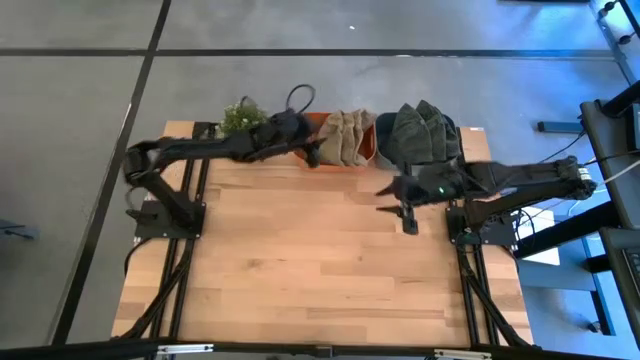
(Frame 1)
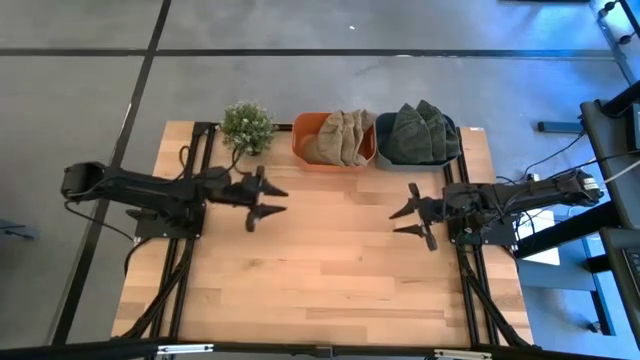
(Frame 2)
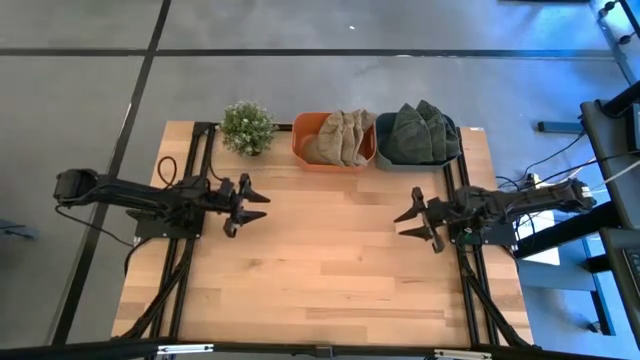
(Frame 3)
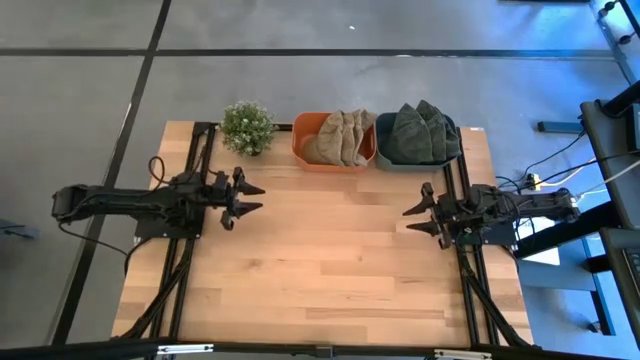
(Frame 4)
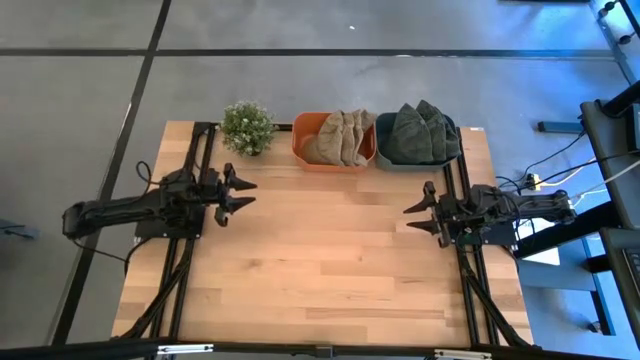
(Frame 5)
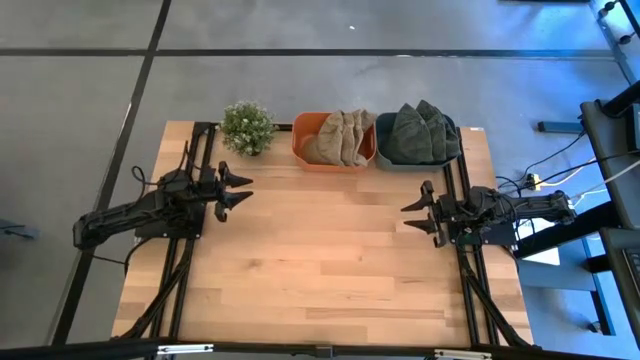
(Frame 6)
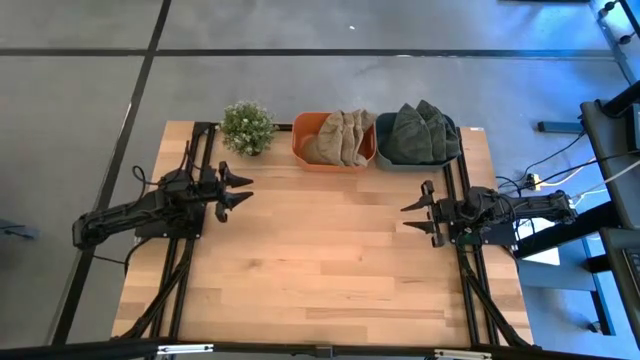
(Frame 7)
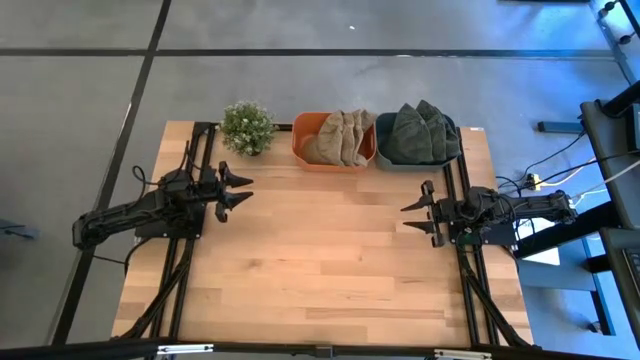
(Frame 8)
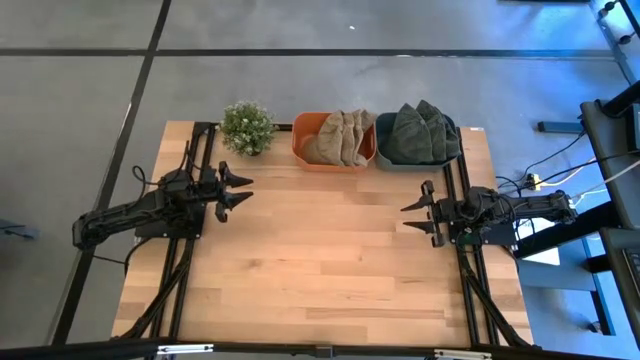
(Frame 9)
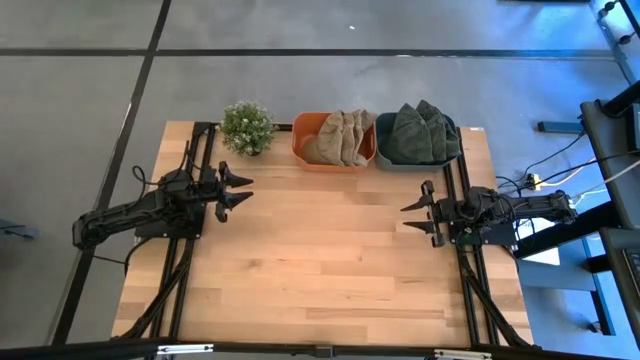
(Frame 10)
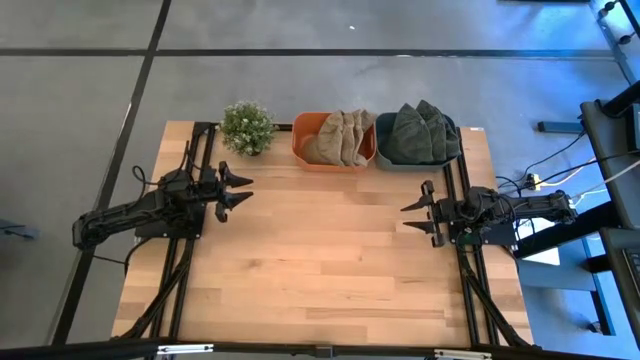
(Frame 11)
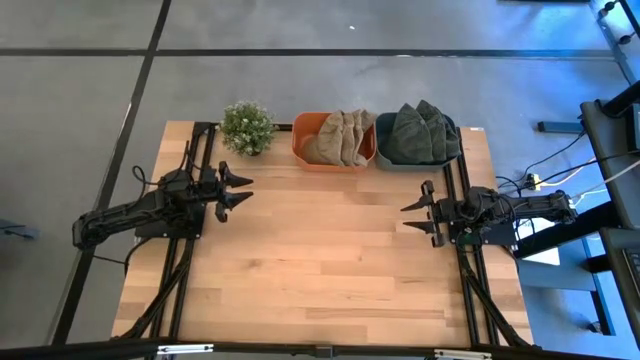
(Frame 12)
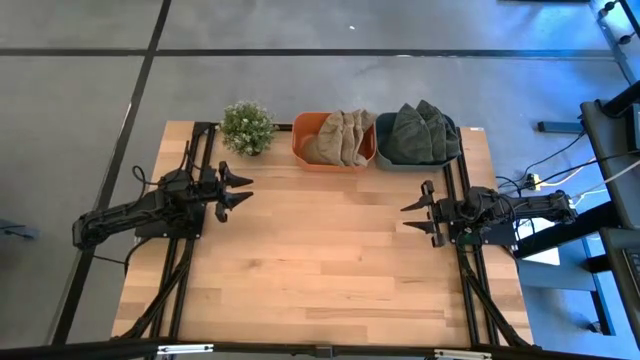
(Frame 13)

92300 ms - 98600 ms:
Task: Pick & Place hat
Return to Home Position

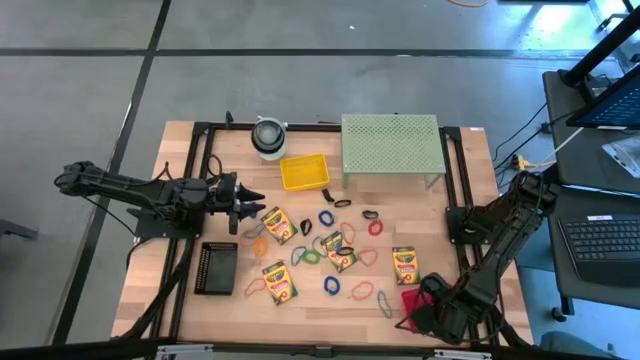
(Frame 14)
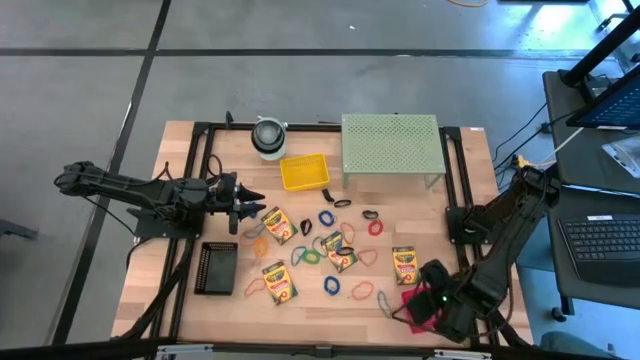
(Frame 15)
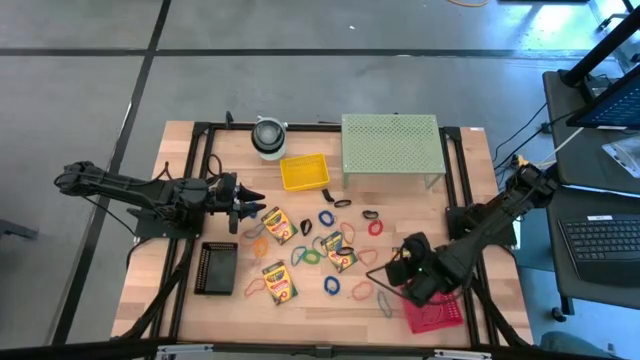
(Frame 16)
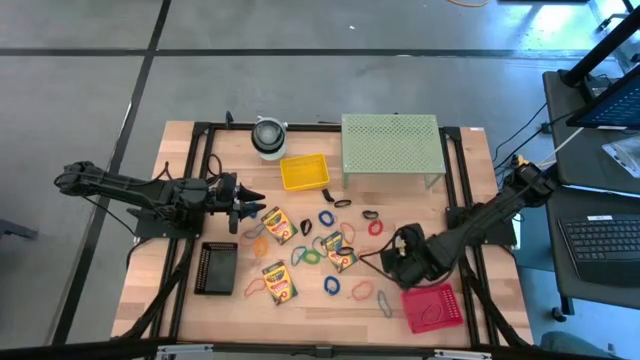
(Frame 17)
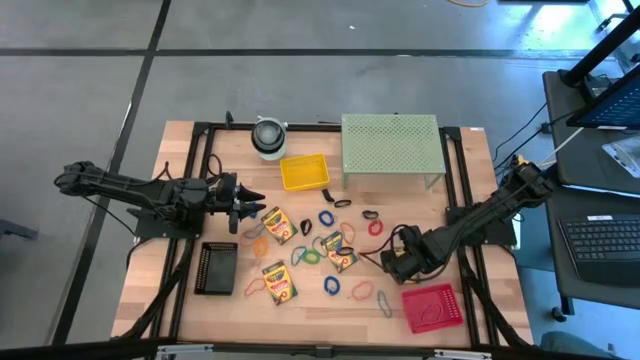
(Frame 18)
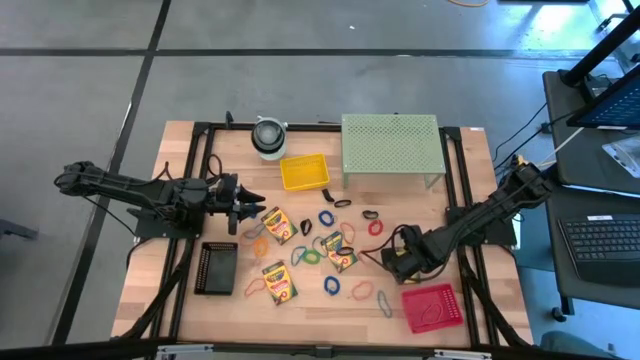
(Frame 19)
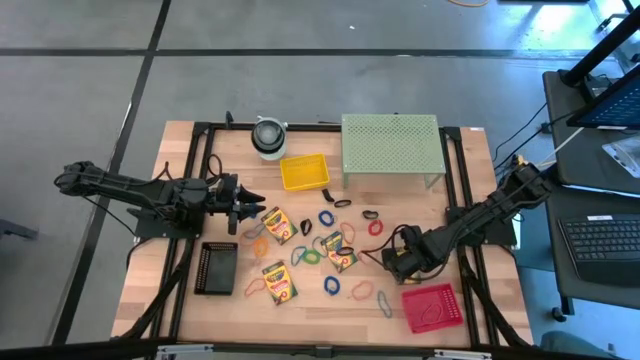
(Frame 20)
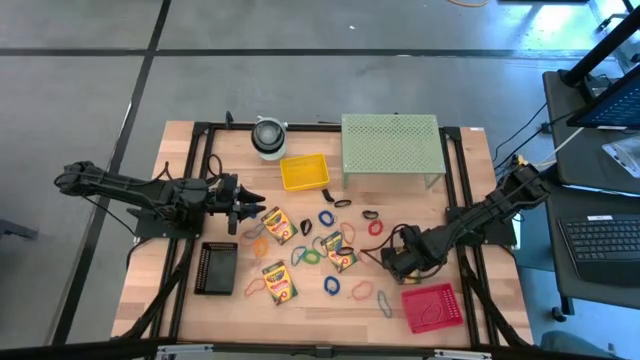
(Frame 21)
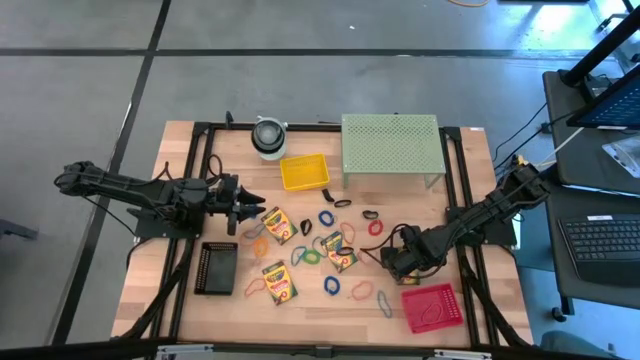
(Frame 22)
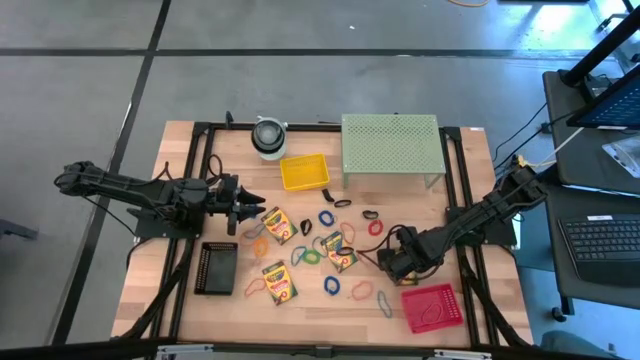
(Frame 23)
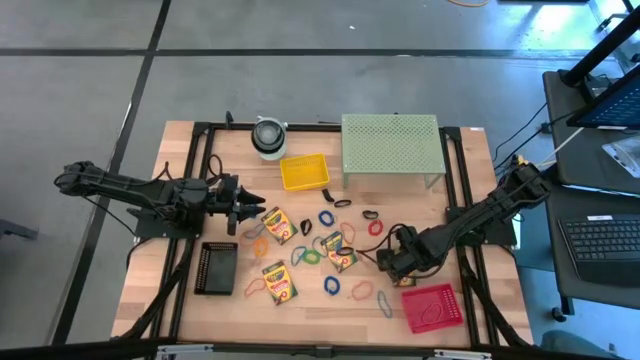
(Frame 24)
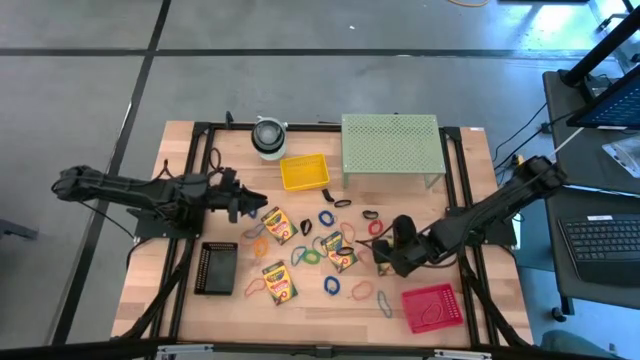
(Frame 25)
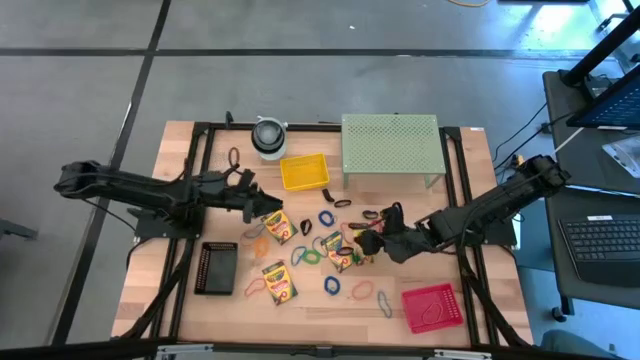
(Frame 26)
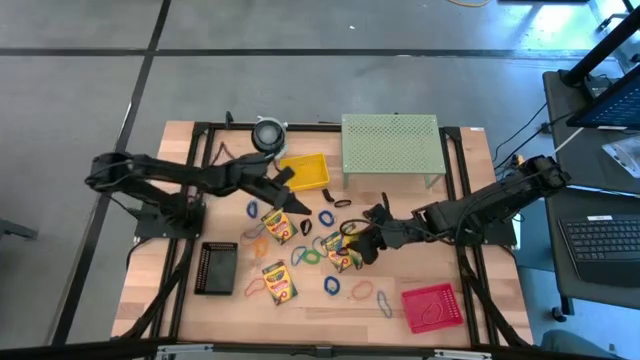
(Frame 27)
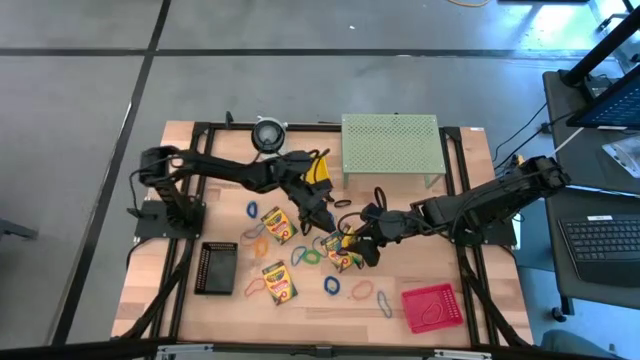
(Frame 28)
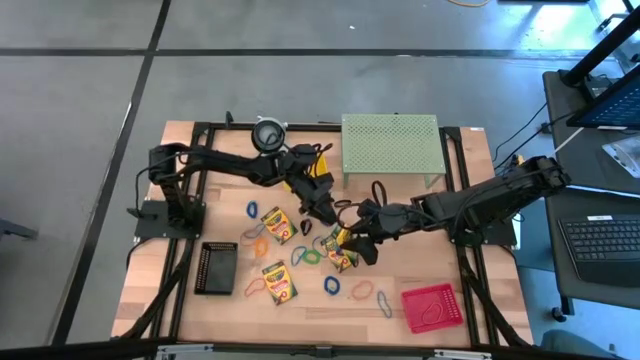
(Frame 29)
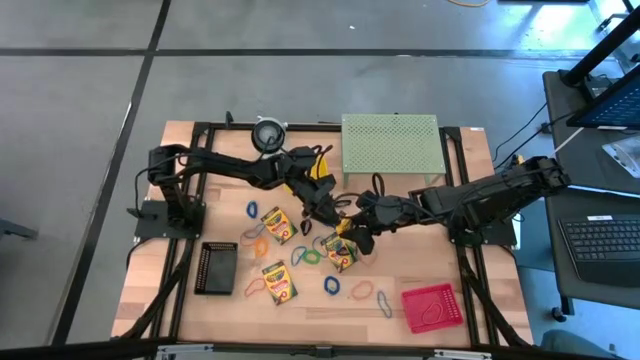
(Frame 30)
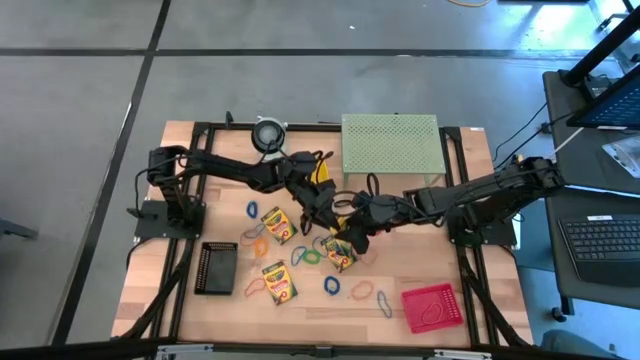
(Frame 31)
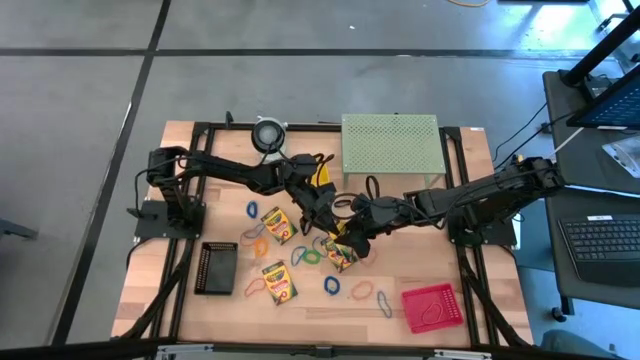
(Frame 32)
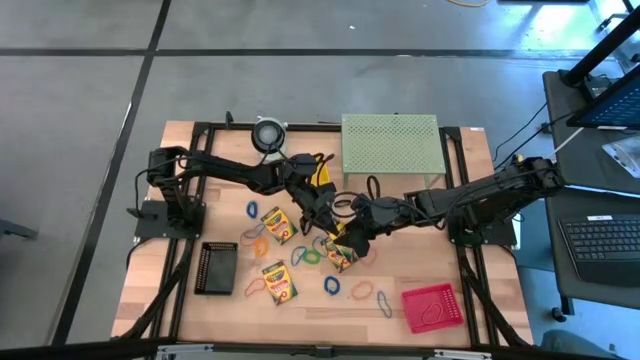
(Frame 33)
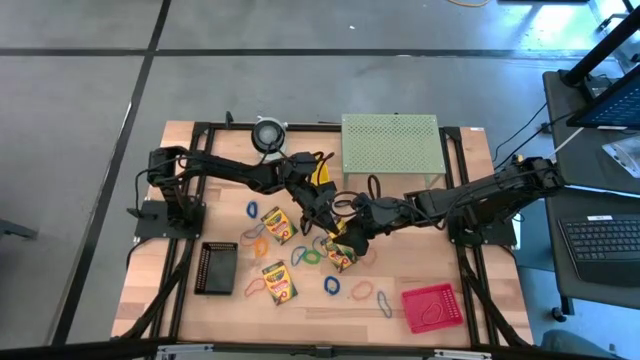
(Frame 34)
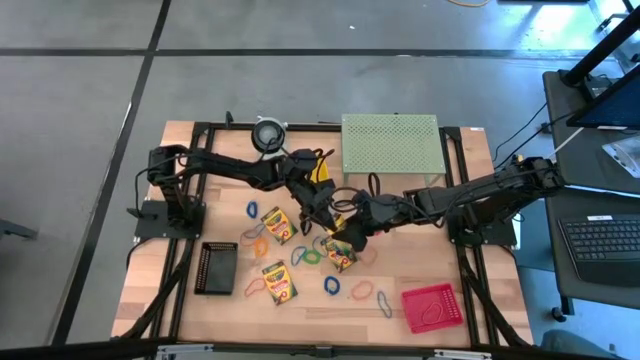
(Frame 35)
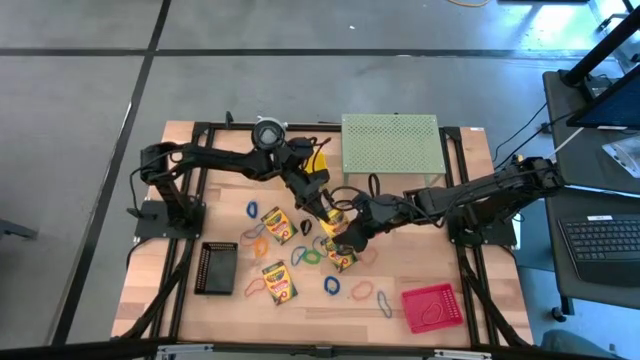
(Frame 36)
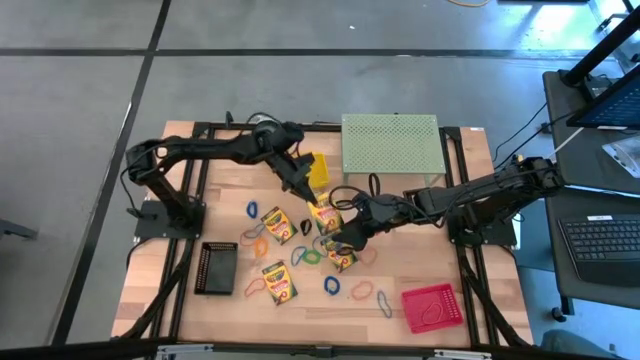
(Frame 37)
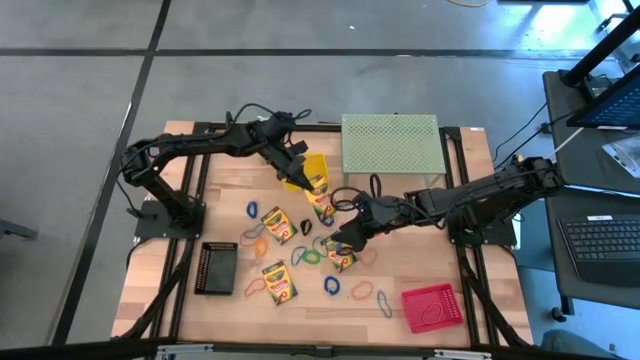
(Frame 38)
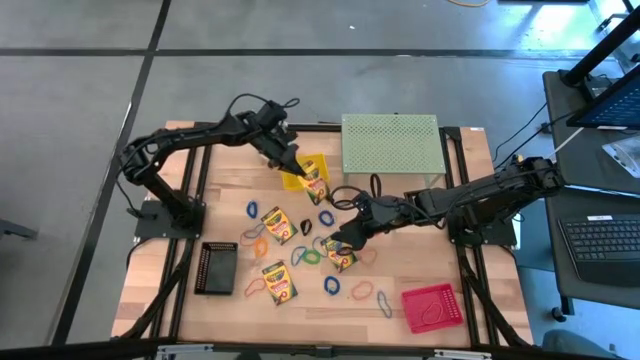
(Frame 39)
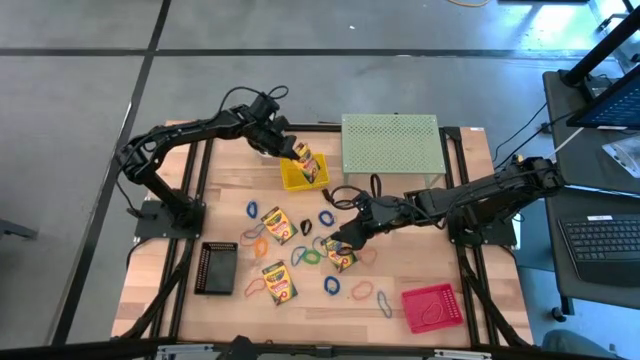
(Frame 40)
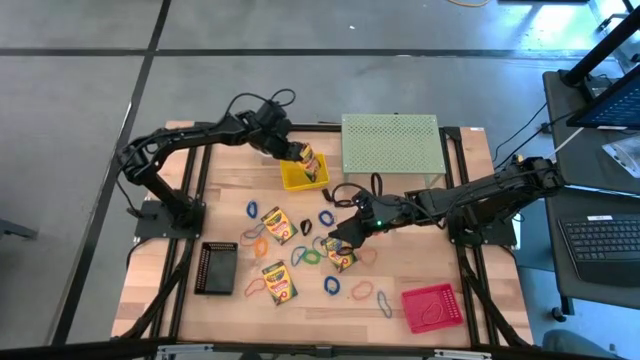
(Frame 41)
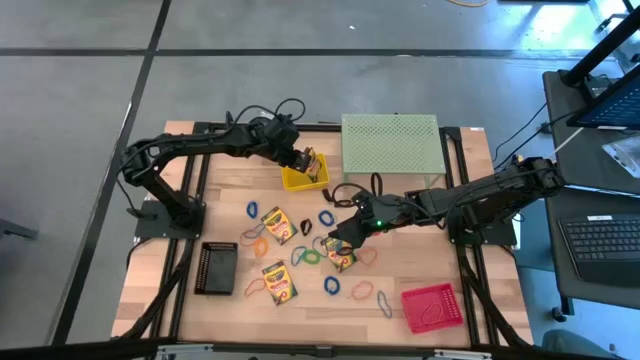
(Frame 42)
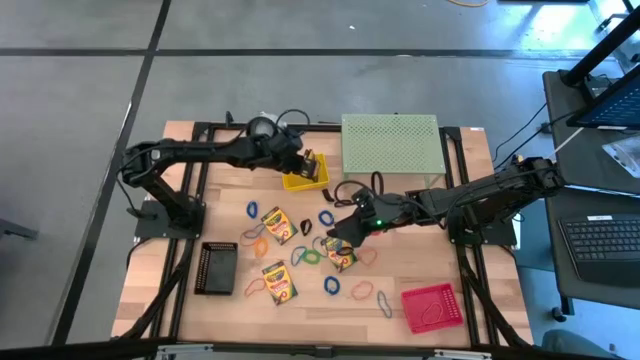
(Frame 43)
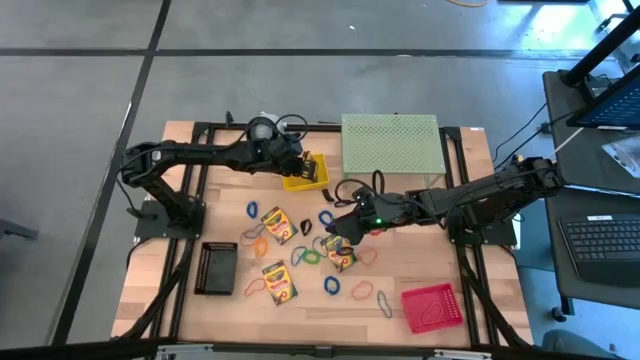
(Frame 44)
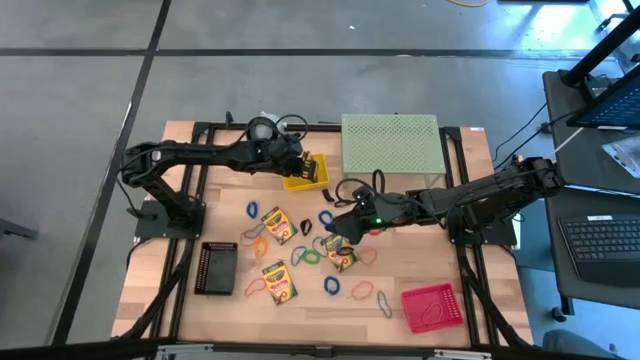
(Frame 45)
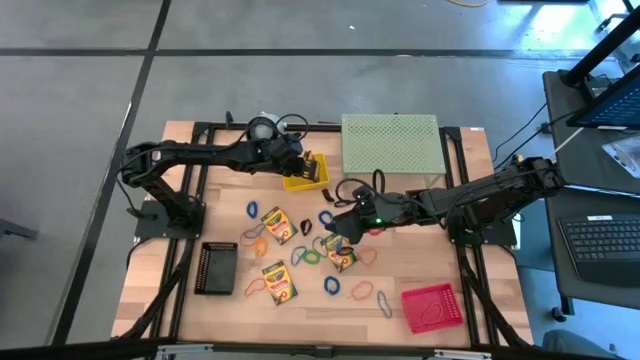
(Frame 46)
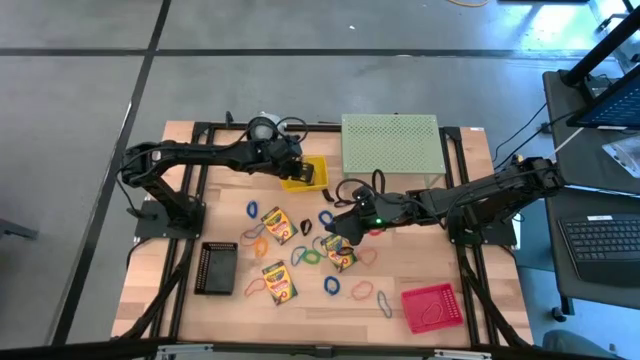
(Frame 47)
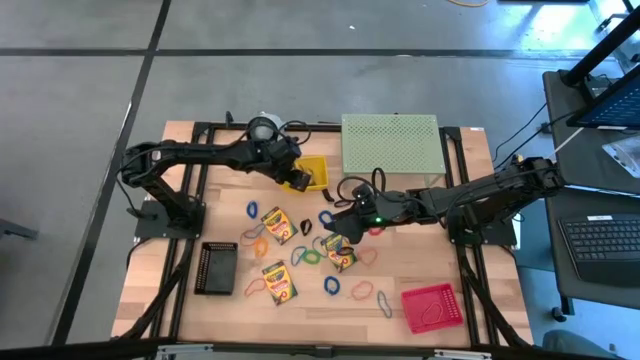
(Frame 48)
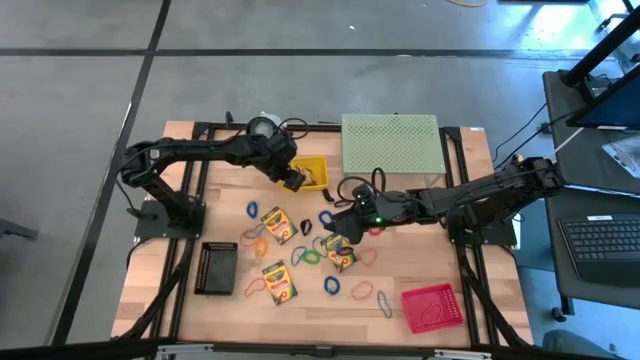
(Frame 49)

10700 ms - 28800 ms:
Task: Pick & Place Office Desk Supplies
Put the crayon box into the yellow bin
